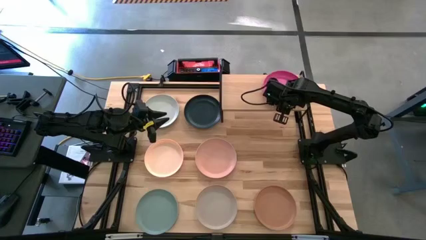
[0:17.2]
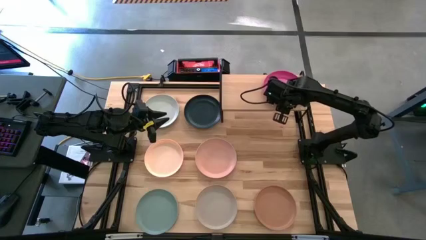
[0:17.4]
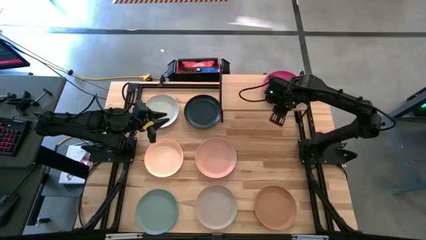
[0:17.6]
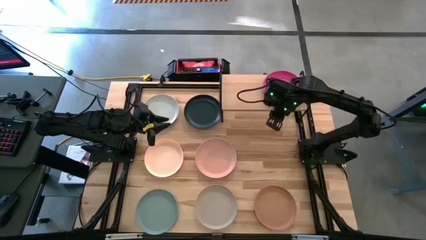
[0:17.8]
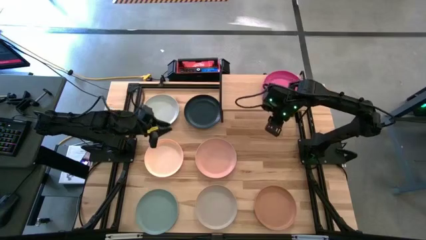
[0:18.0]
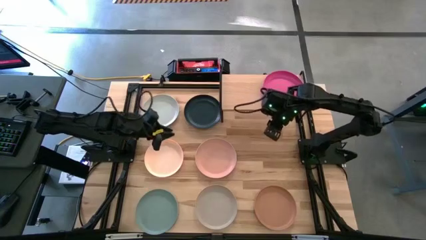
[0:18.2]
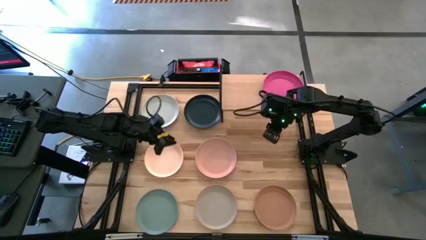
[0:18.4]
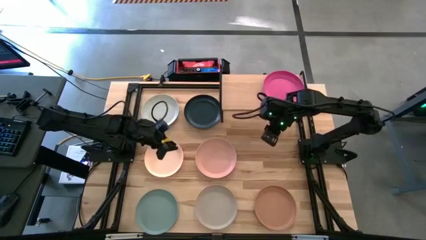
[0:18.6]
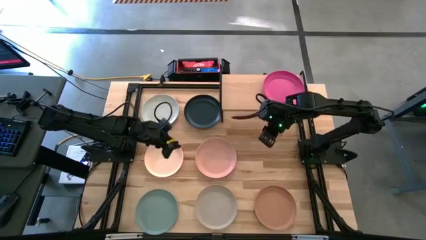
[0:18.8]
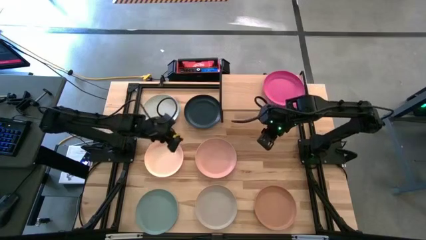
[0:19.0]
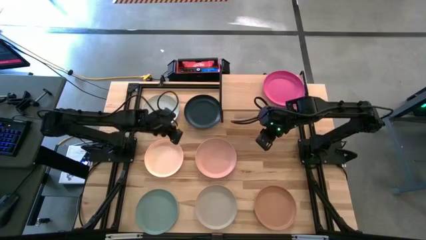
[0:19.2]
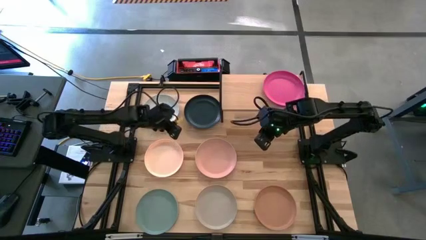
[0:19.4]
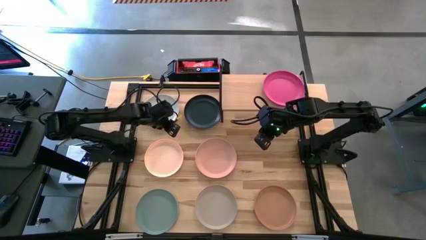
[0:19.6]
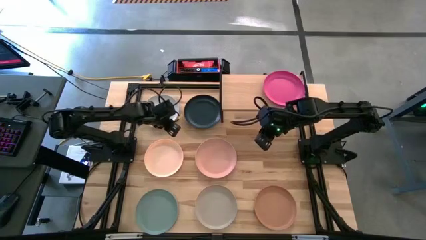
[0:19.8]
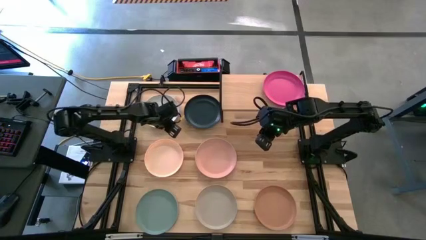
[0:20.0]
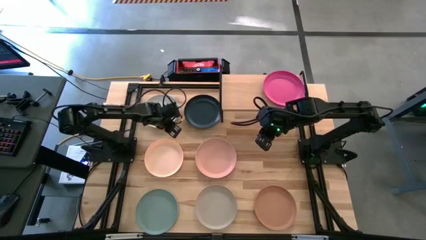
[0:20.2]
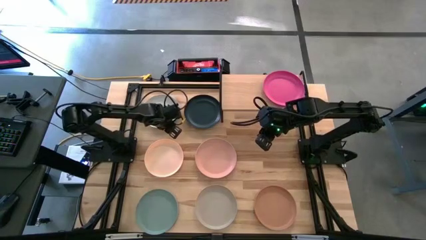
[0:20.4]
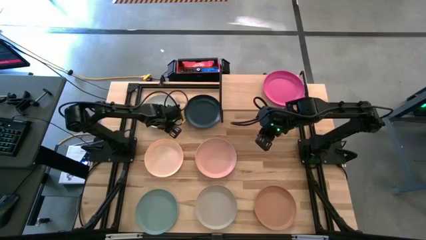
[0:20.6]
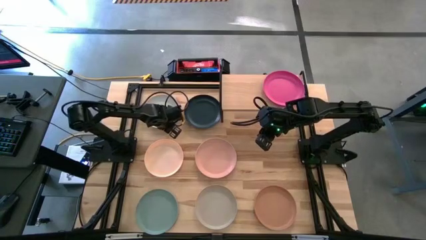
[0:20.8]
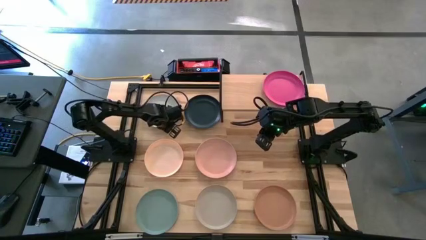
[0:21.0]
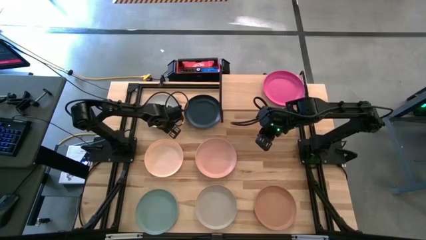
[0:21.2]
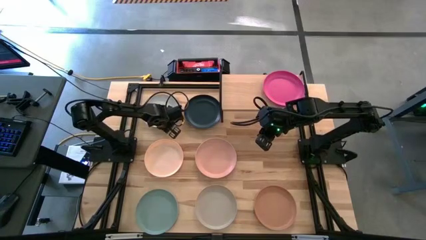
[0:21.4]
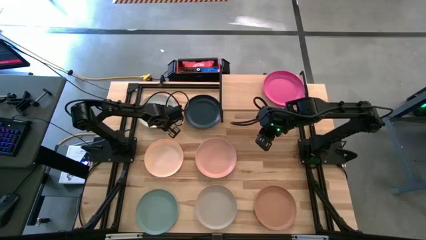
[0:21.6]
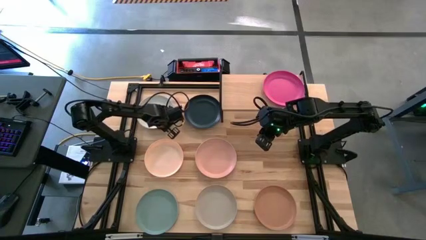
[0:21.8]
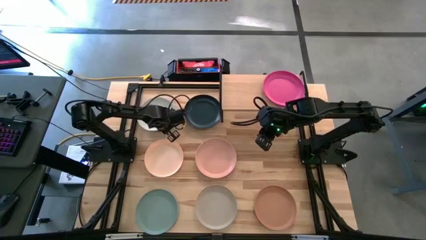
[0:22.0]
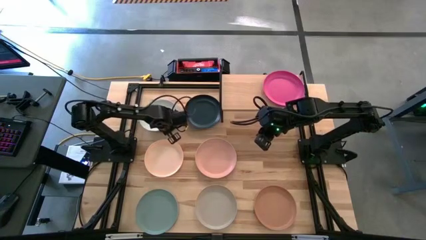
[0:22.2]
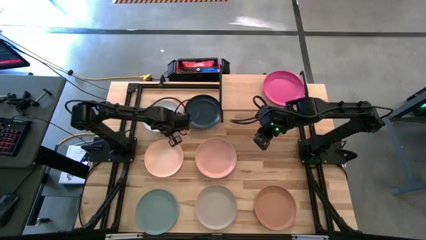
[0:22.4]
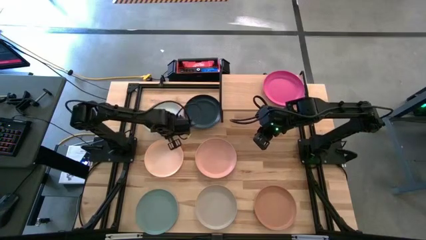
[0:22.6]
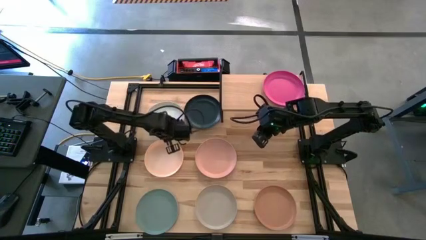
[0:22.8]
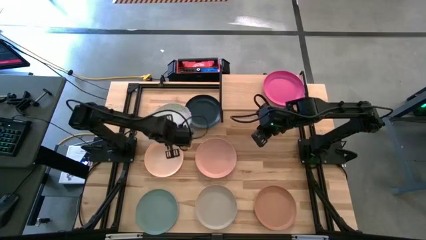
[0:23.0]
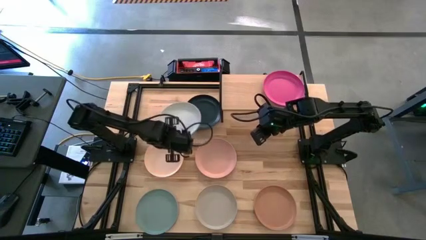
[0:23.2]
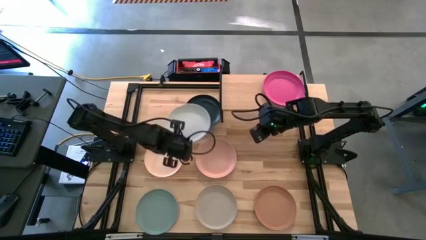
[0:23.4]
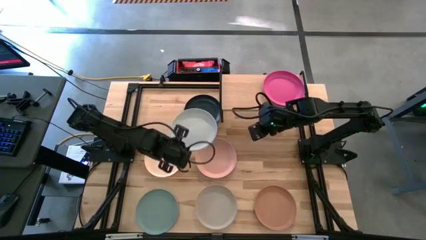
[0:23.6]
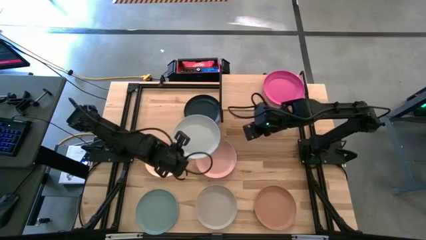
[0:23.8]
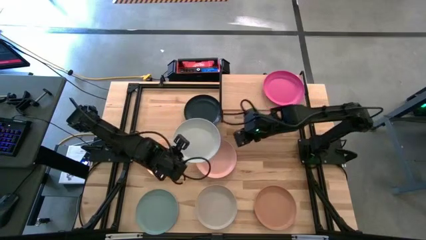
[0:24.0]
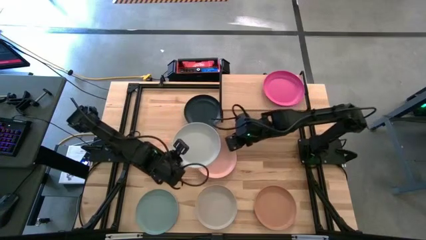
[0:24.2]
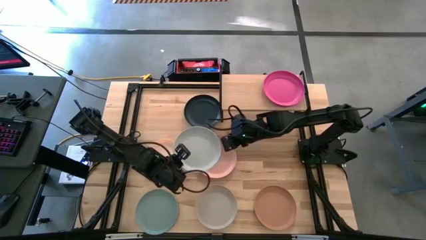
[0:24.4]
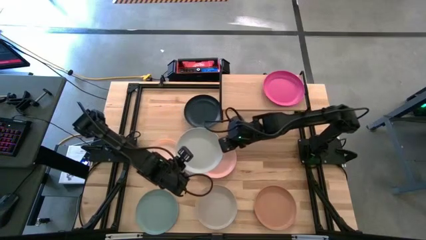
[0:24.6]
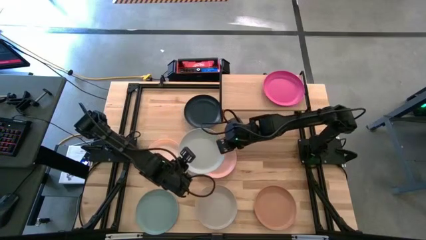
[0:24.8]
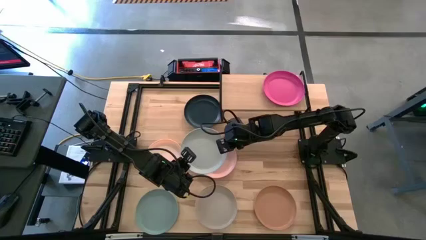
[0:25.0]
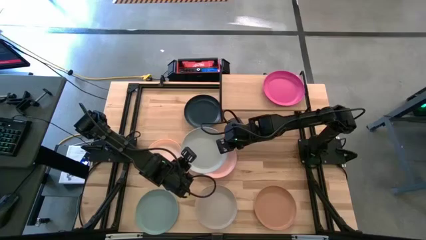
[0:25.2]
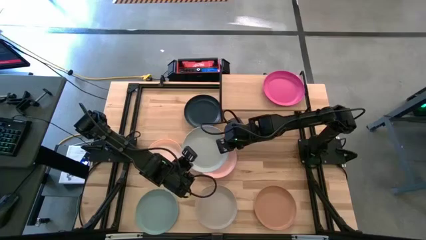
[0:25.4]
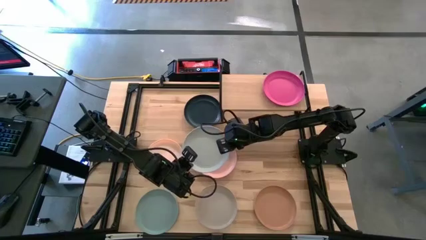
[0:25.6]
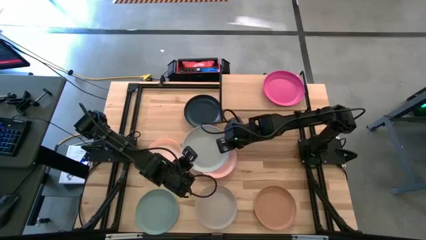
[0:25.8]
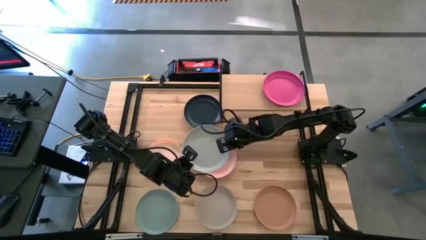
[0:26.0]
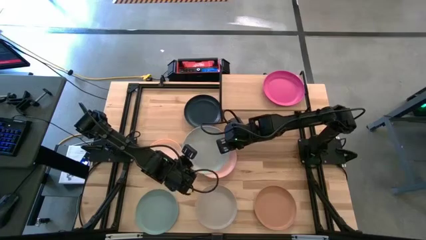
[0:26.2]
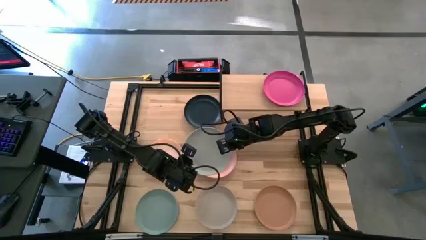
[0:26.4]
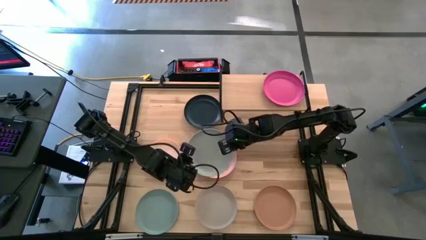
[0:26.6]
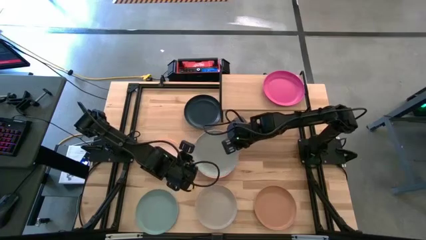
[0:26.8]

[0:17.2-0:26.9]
Task: Place and stack plates onto a shelf
Stack the white plate on top of the pink plate on the shelf

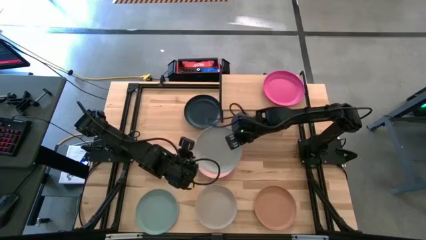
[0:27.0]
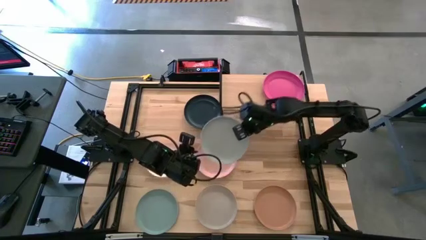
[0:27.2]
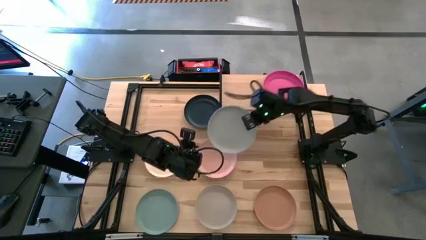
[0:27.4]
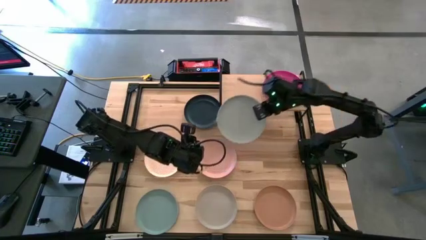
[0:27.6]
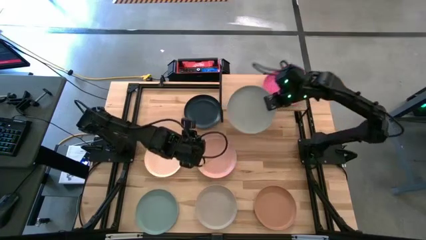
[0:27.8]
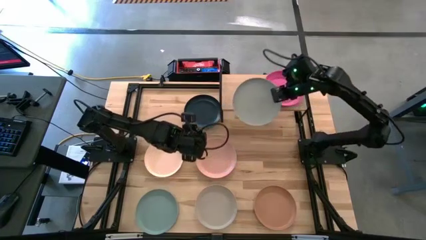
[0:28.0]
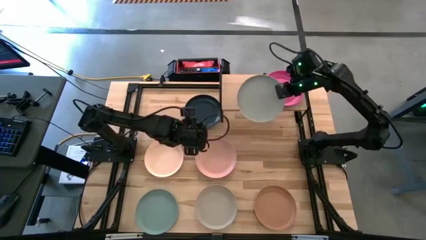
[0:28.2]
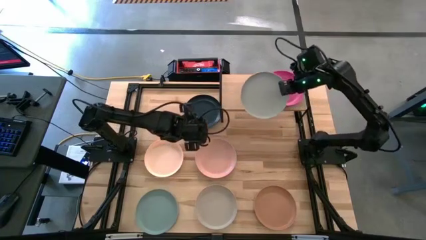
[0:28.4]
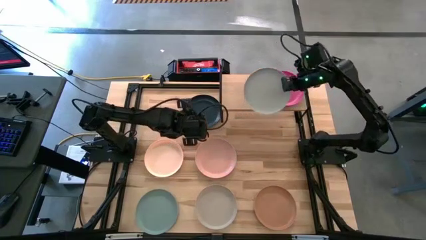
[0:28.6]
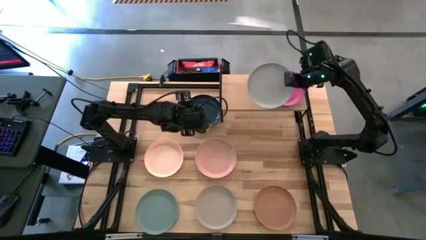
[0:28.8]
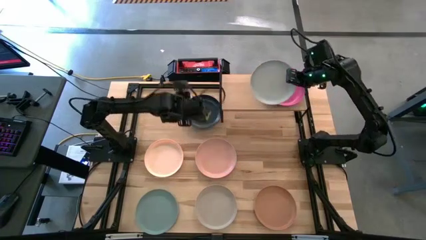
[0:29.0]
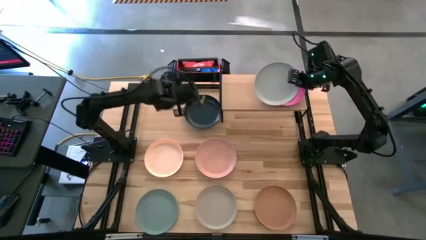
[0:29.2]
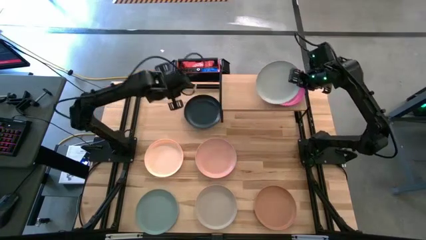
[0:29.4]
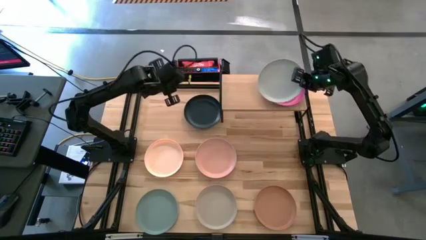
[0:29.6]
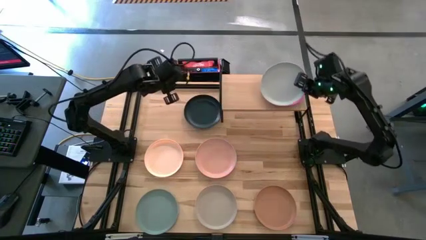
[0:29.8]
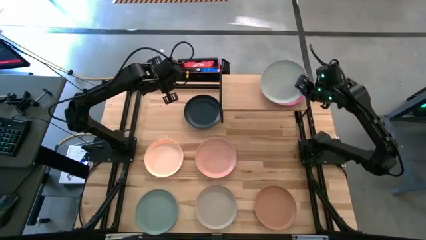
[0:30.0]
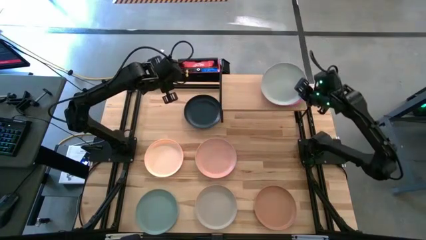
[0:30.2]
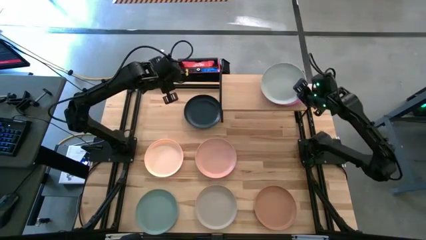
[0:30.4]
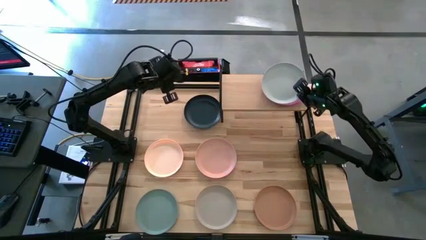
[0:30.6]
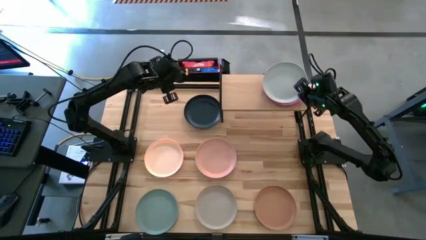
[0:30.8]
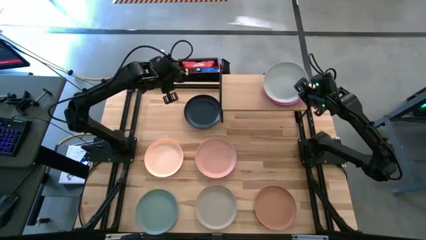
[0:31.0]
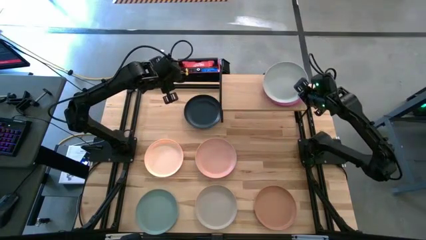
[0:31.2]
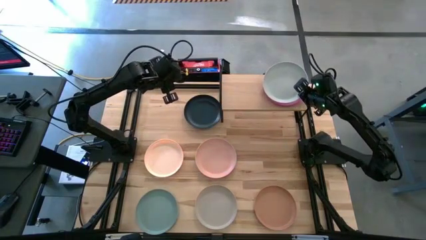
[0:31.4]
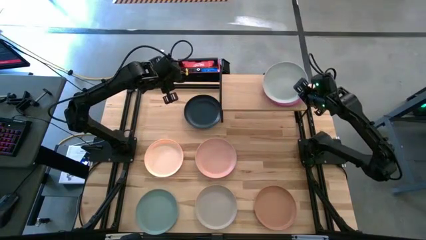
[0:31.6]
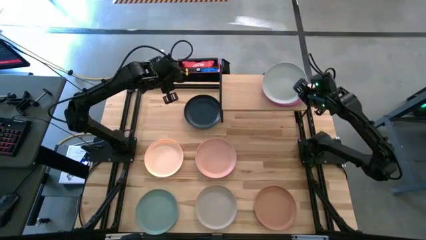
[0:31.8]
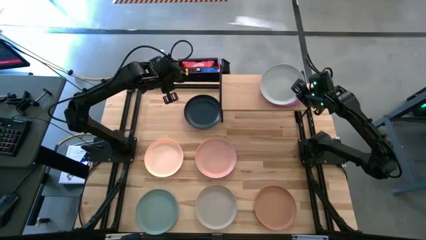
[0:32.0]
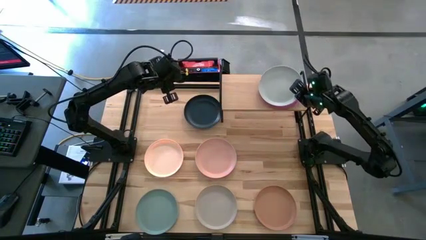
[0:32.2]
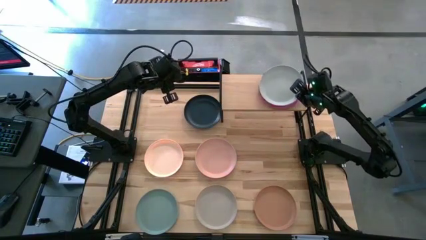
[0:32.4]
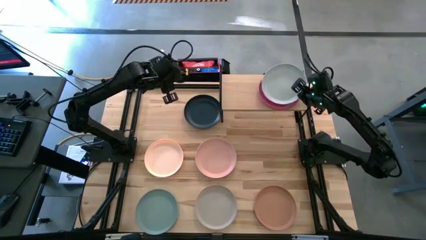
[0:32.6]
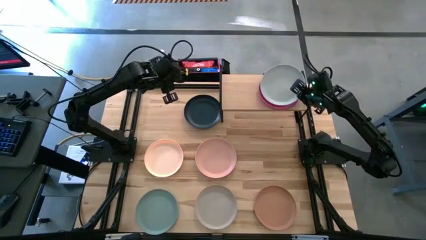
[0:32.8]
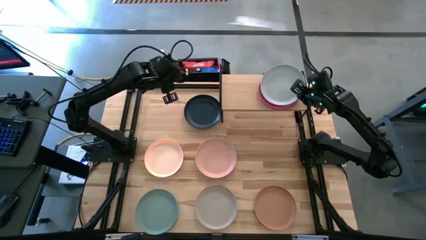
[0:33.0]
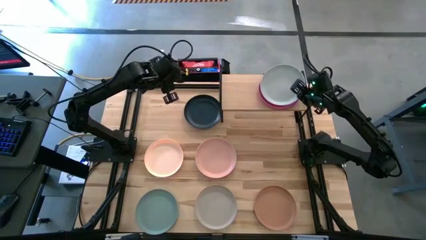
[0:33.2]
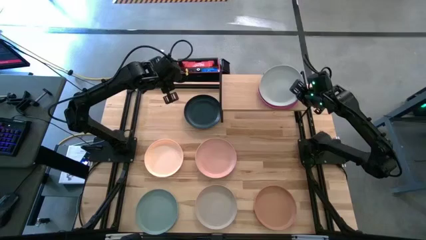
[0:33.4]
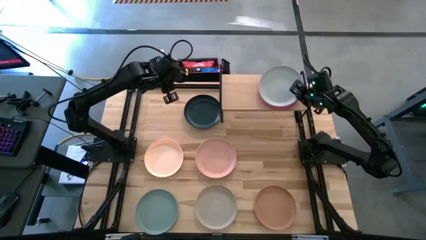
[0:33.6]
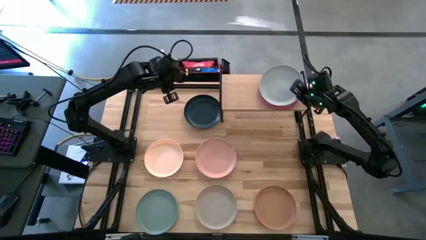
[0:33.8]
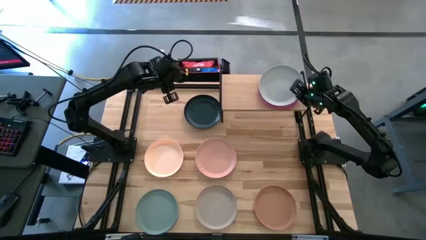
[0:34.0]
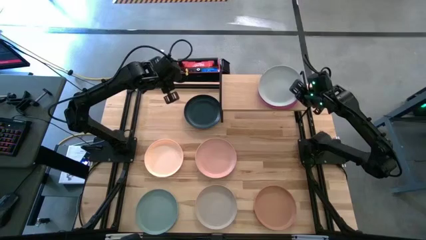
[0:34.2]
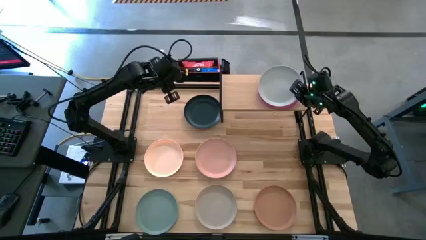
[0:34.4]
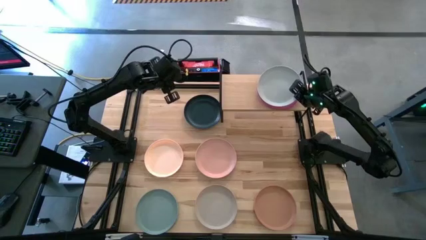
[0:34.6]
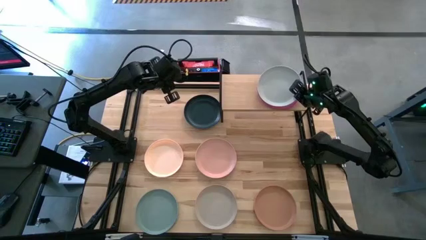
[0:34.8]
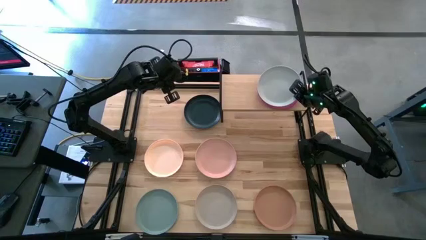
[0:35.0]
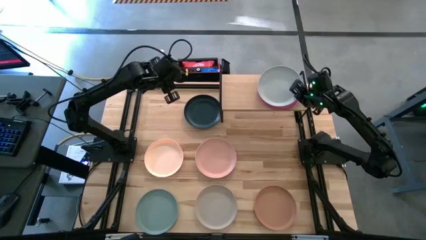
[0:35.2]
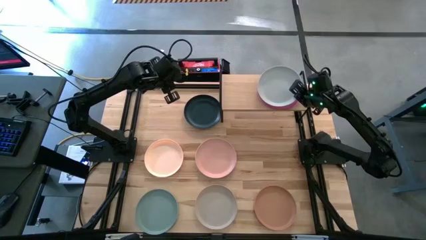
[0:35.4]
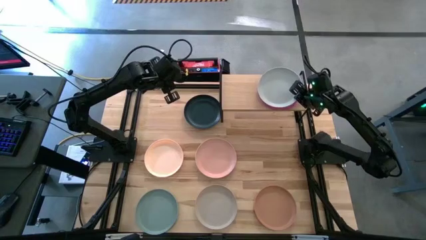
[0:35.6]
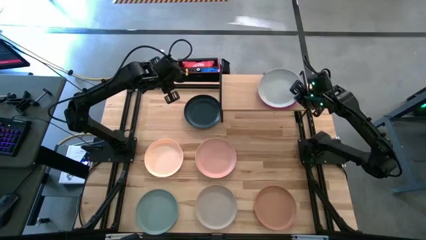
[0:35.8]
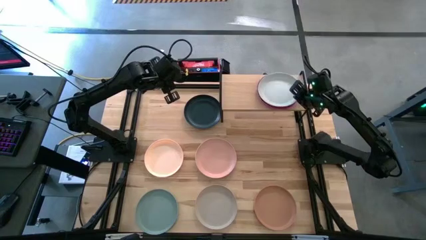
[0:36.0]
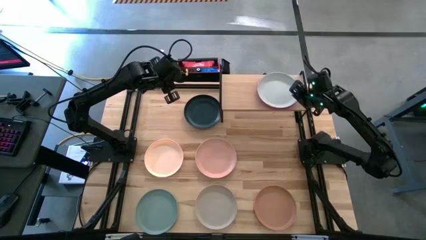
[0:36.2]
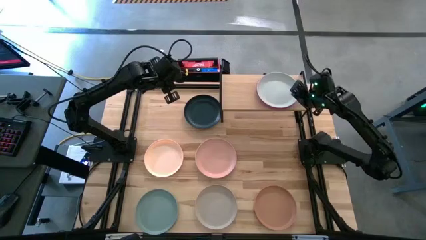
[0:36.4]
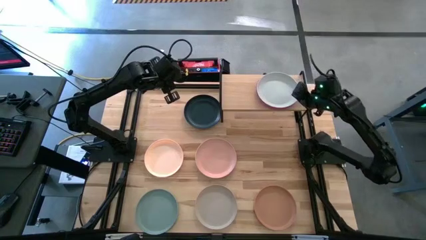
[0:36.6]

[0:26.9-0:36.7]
Stack the white plate on top of the pink plate on the shelf
